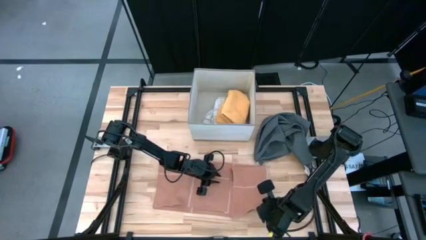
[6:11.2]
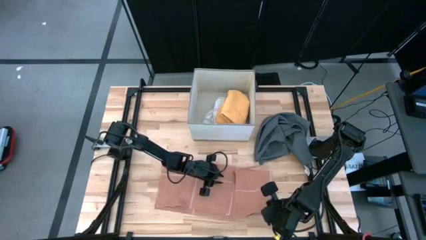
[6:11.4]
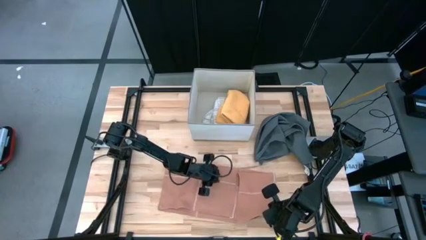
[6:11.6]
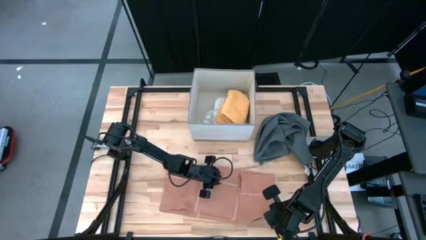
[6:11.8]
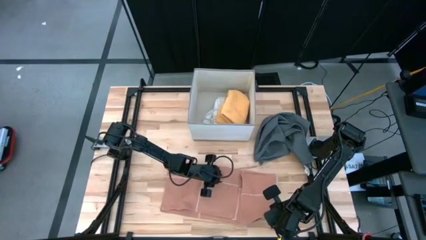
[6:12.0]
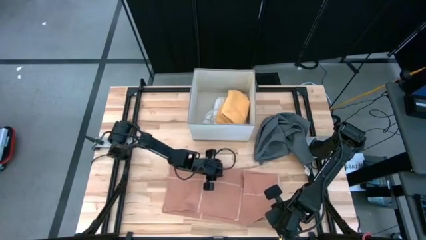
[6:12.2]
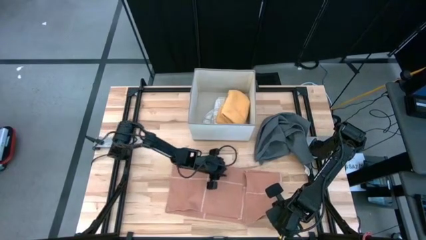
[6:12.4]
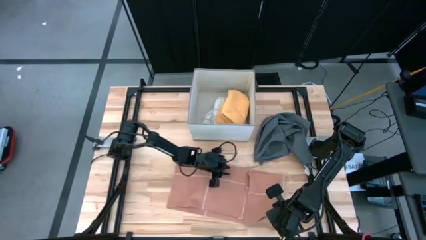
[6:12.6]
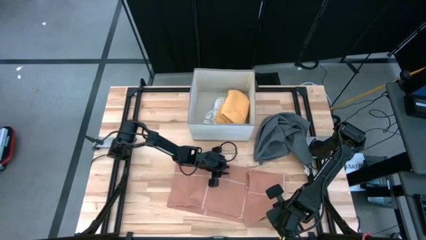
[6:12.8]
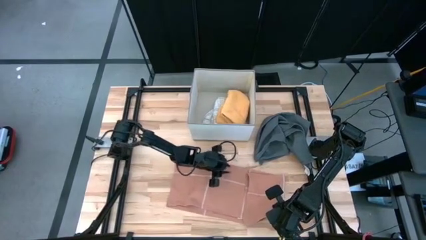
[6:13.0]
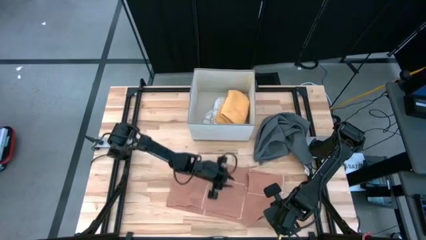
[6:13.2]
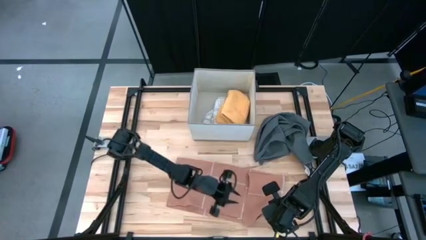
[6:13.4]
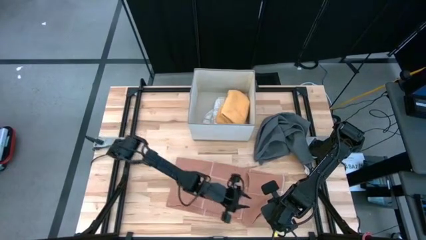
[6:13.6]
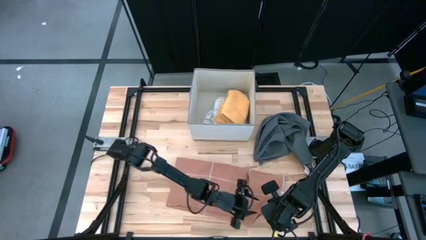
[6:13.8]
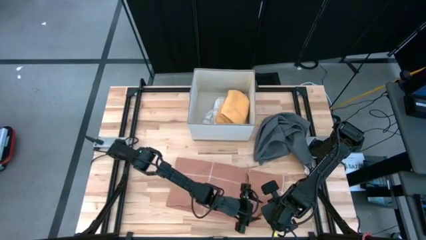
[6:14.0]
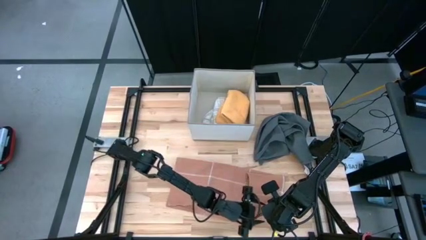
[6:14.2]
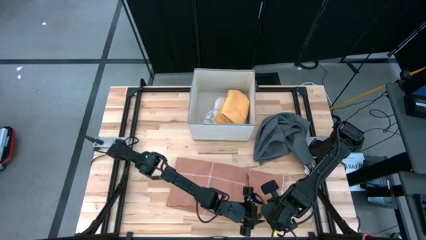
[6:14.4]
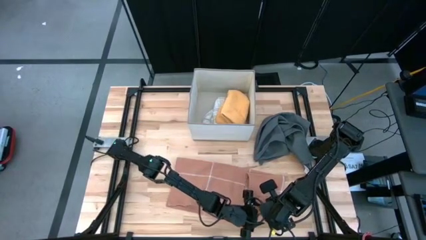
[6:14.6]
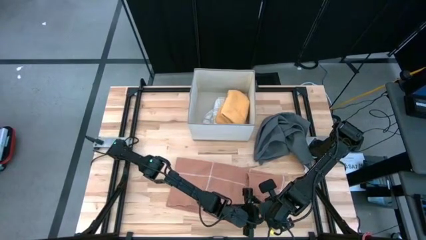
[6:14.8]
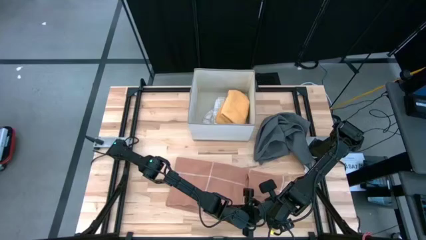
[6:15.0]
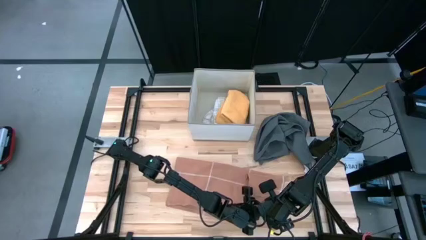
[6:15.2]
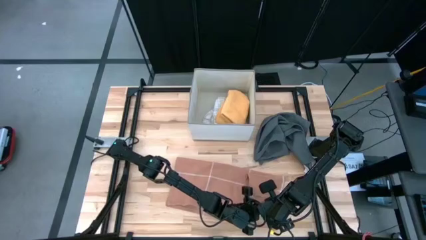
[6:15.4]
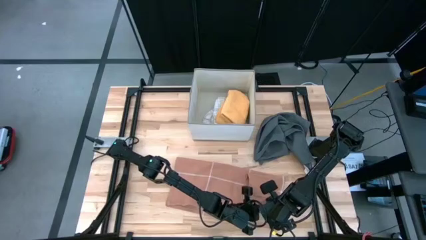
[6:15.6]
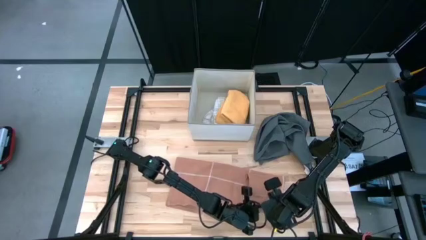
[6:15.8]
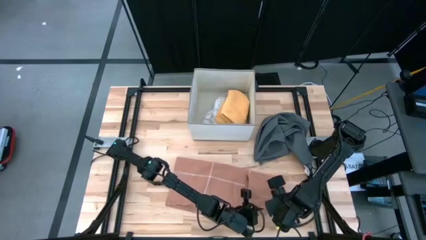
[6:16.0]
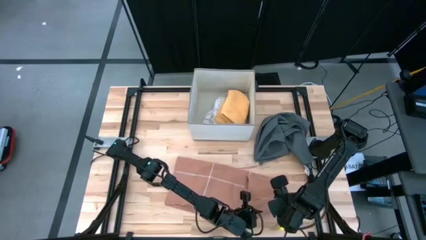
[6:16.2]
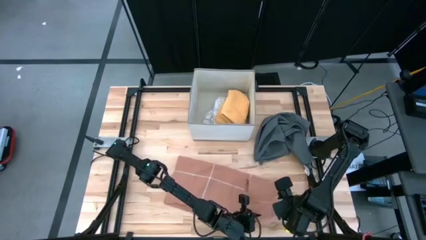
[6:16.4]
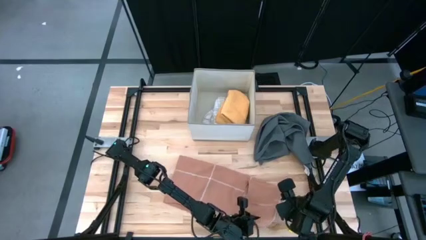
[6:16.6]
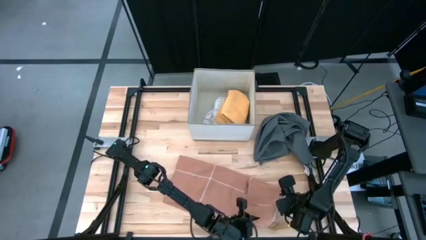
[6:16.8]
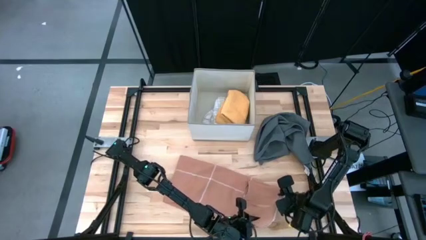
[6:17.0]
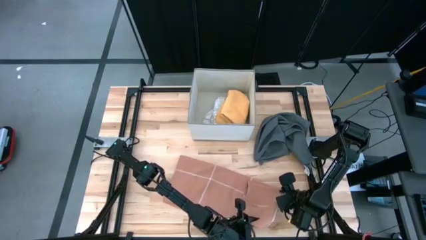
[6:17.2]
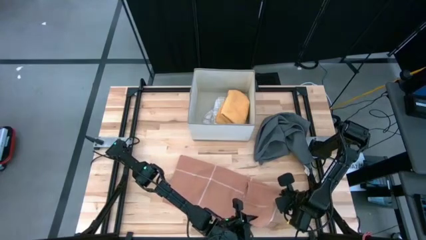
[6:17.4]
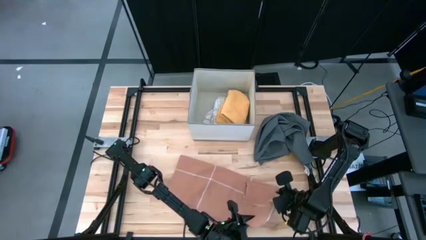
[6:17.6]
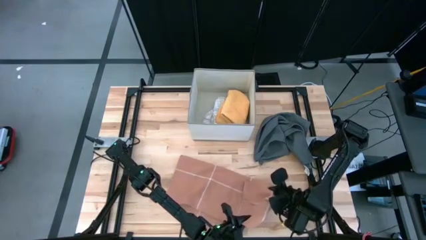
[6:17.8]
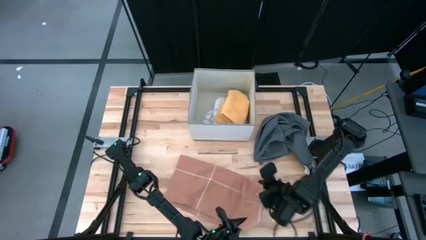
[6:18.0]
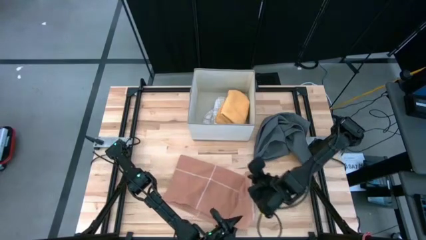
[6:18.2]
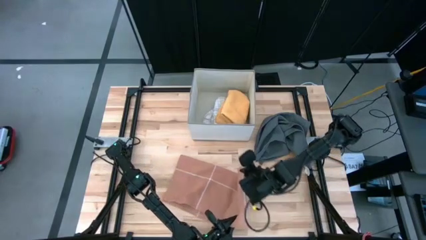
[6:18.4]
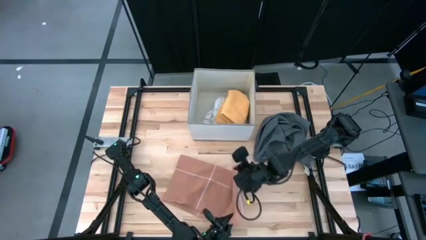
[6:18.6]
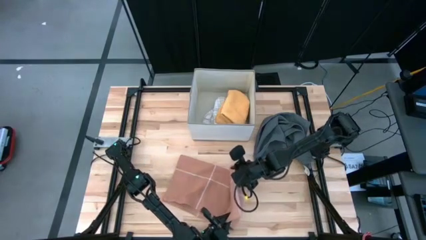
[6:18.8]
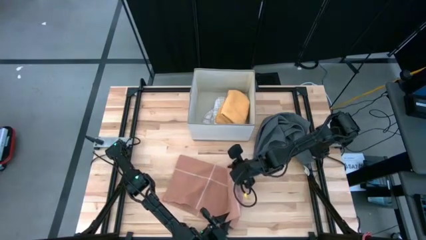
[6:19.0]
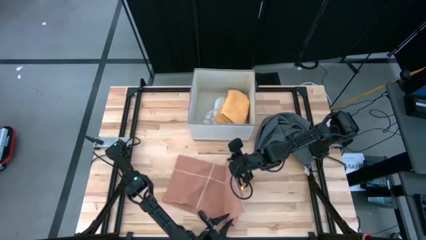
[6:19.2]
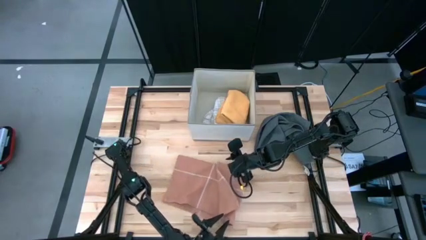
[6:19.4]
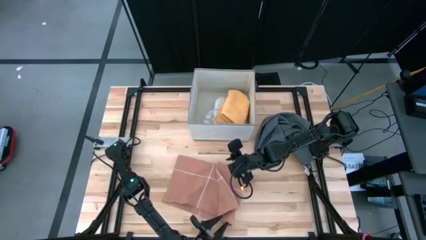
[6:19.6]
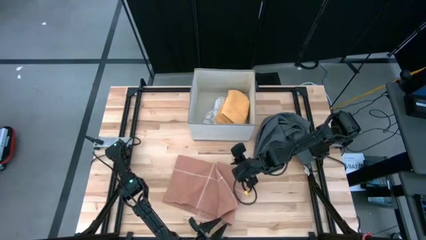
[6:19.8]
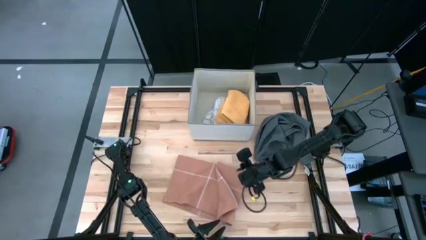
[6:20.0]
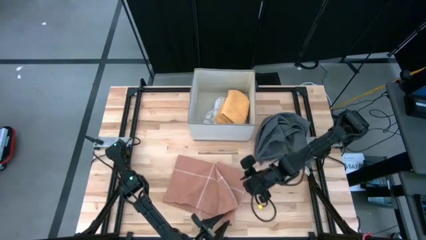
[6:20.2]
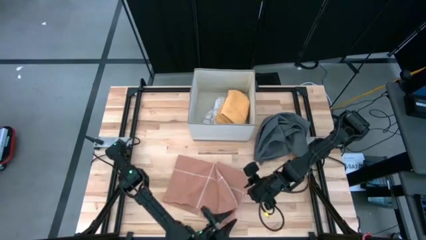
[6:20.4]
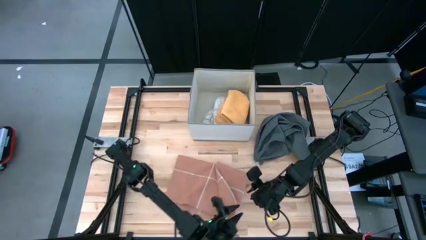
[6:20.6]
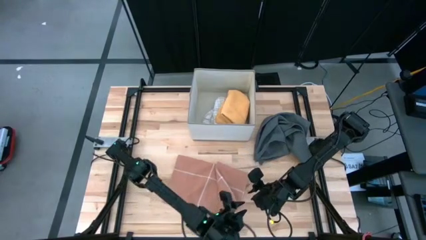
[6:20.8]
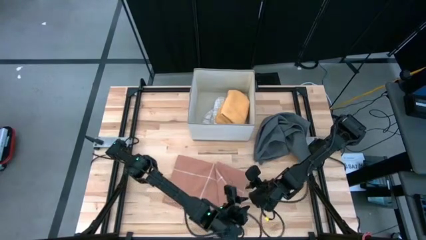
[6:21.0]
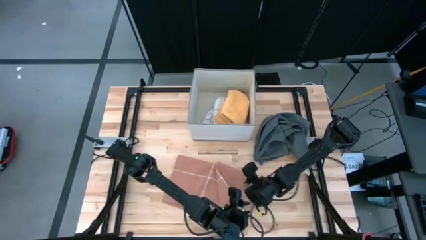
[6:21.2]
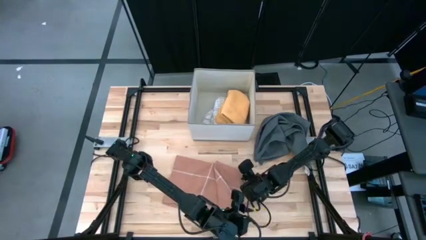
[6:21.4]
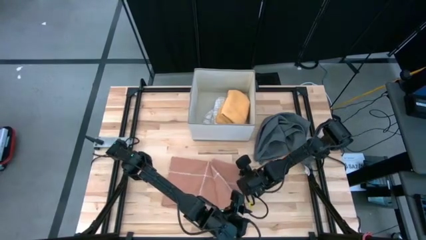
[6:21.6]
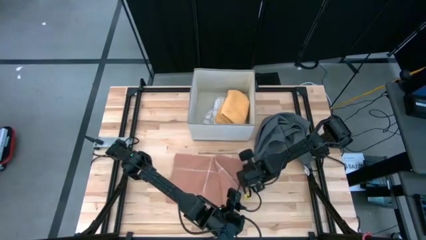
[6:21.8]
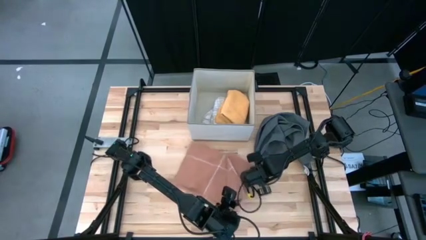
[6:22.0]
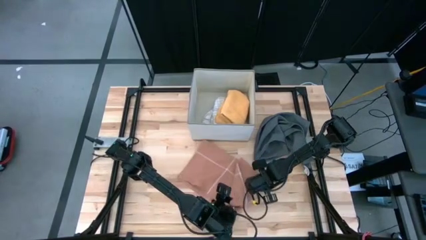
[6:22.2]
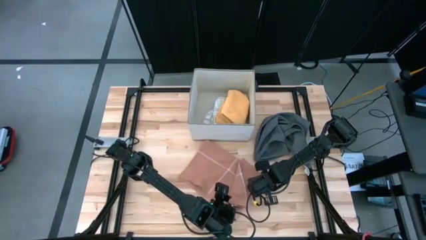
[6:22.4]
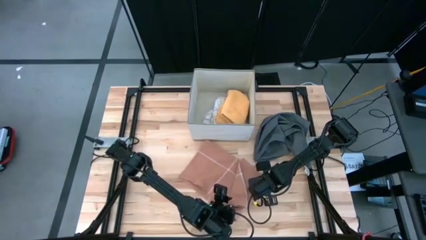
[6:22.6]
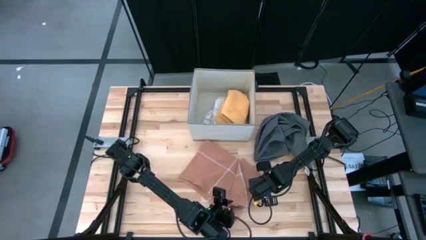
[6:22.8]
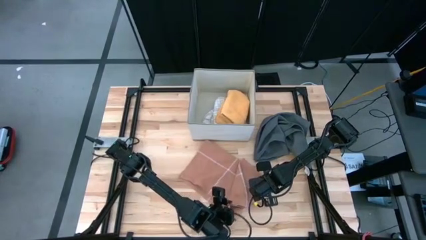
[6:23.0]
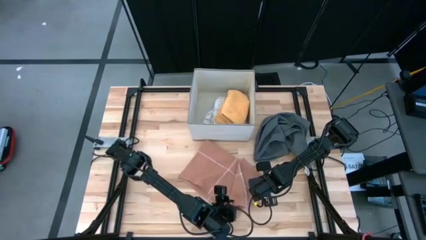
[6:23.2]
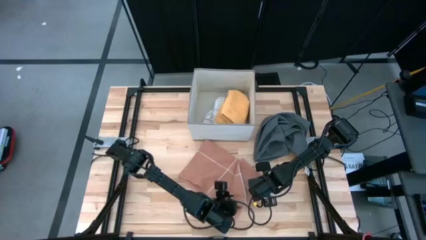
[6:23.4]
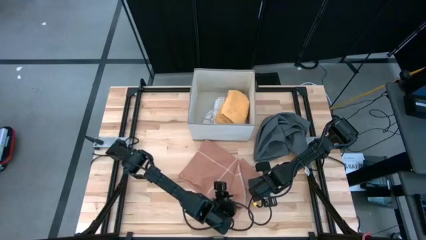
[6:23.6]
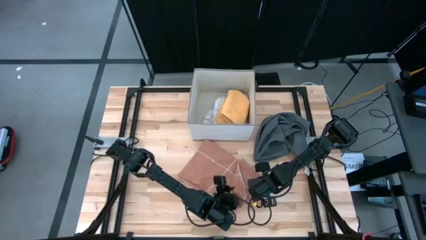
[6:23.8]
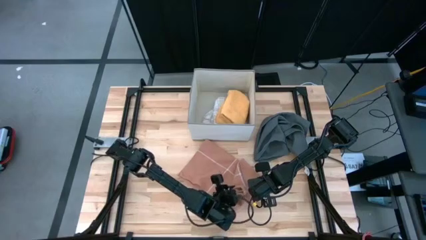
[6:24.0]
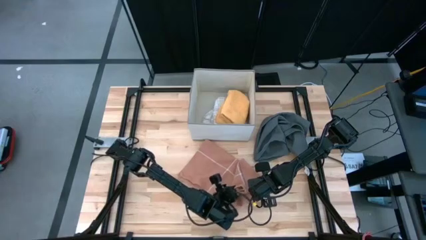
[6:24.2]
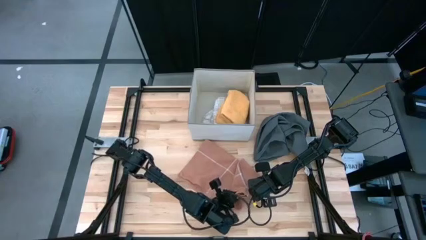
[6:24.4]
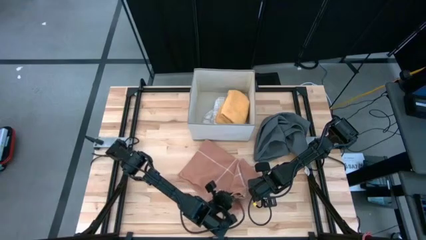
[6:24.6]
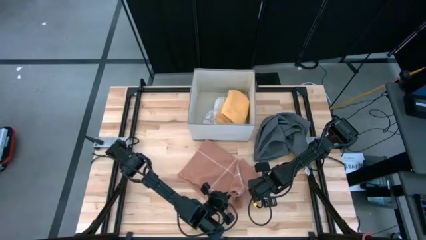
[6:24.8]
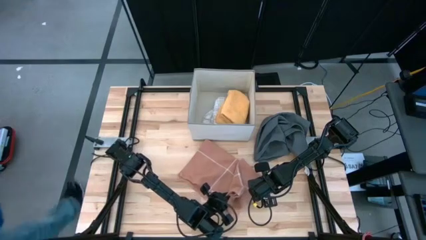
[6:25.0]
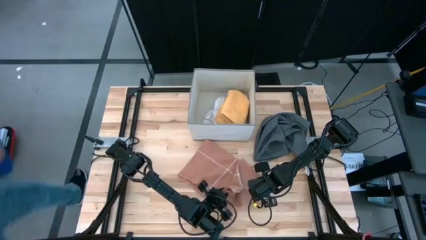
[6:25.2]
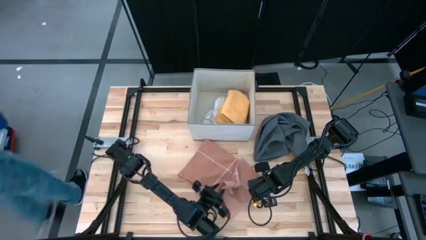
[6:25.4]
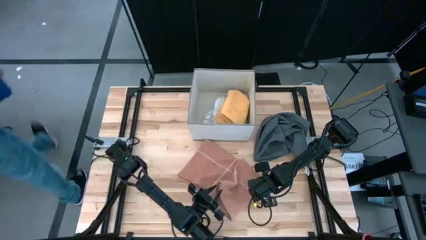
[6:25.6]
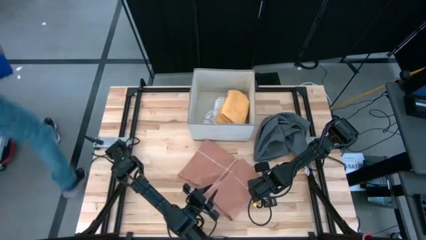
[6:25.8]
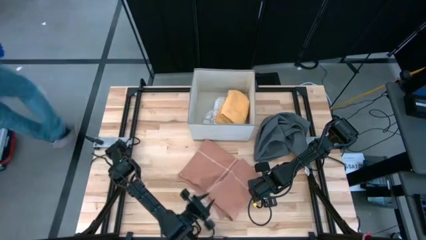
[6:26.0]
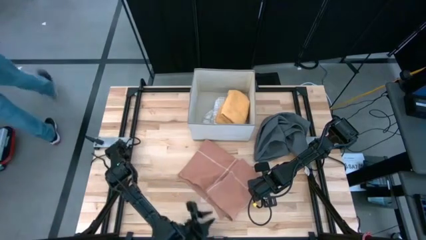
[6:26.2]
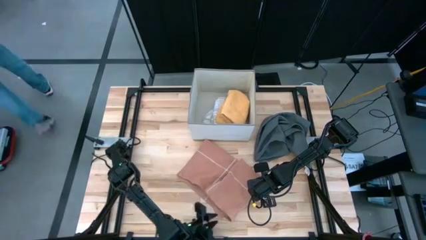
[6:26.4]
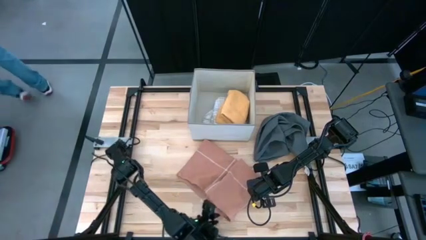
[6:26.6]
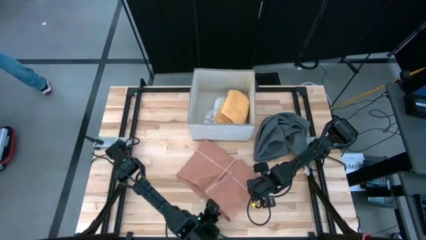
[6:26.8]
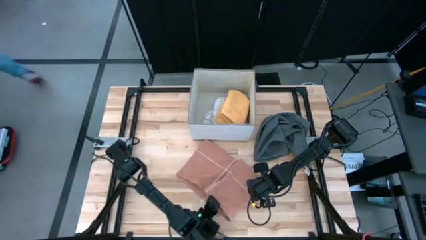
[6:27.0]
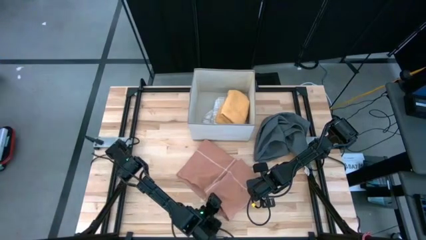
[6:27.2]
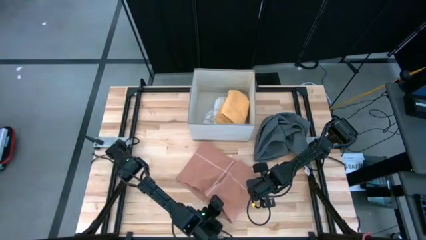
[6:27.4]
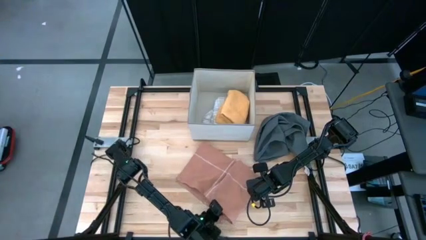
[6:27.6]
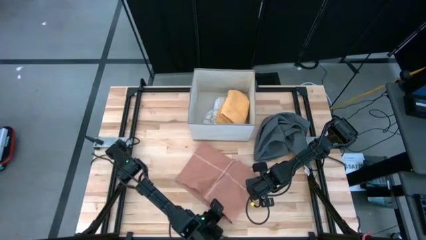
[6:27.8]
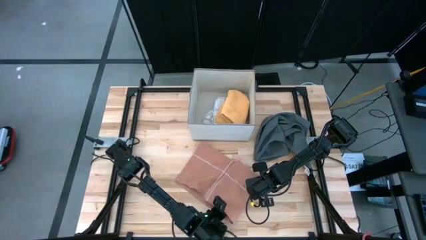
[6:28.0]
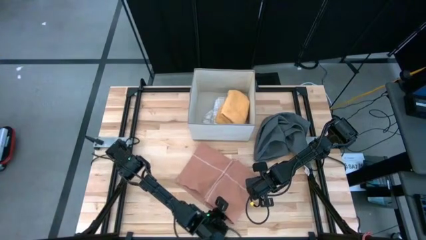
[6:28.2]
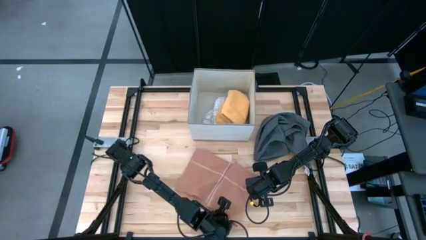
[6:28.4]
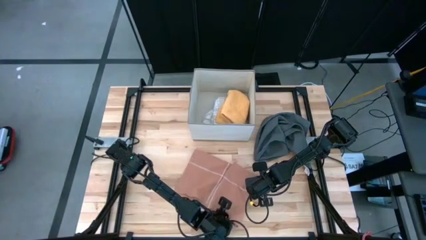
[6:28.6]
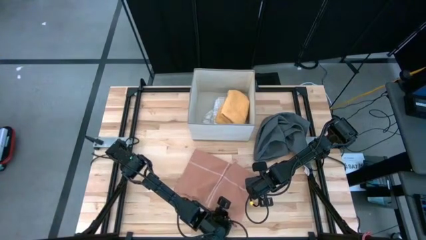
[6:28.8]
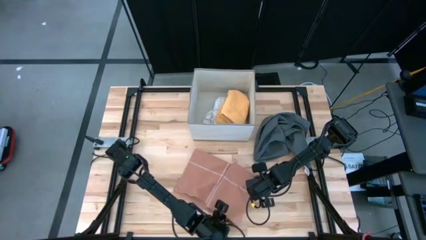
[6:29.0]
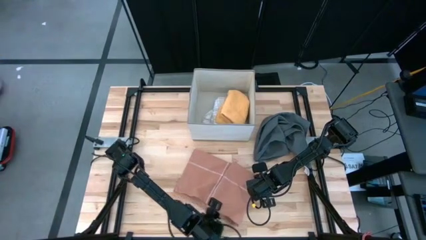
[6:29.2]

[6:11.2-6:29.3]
Task: Fold towel
Fold the light orange towel
